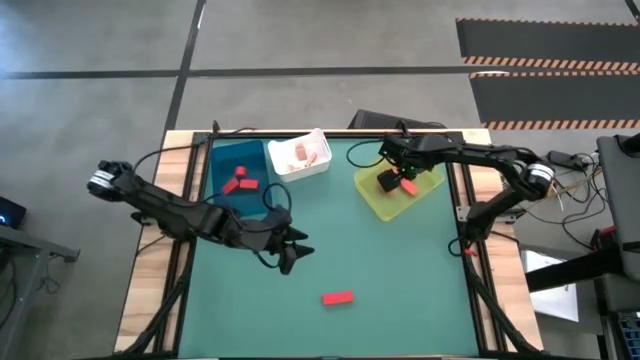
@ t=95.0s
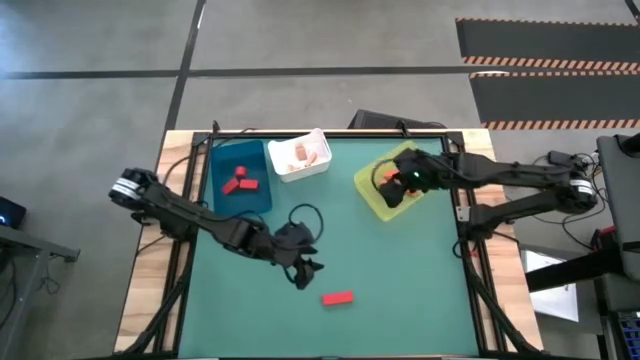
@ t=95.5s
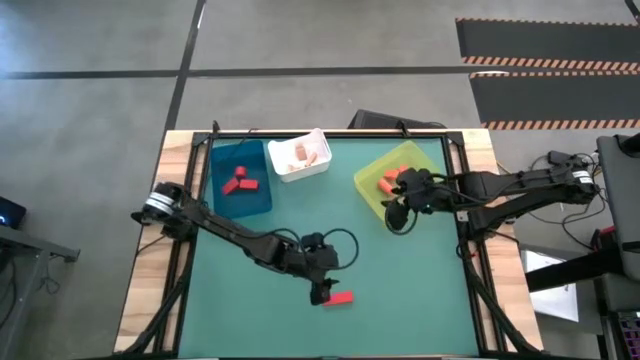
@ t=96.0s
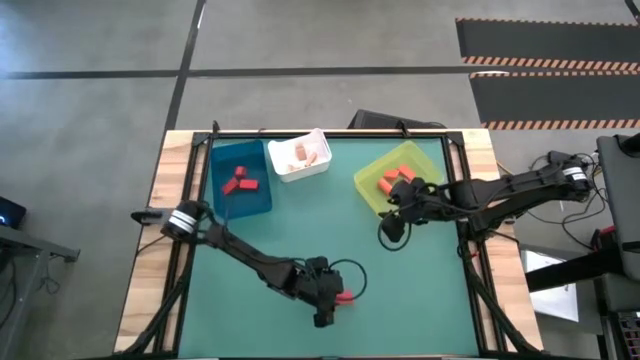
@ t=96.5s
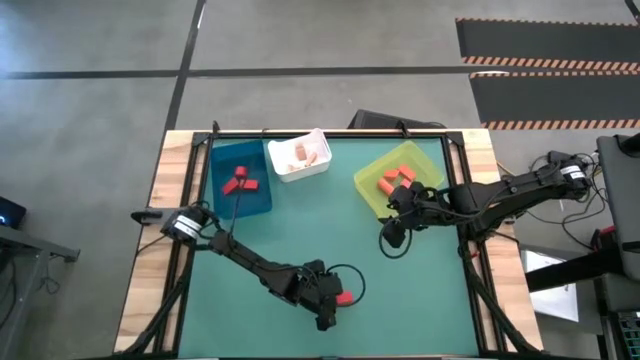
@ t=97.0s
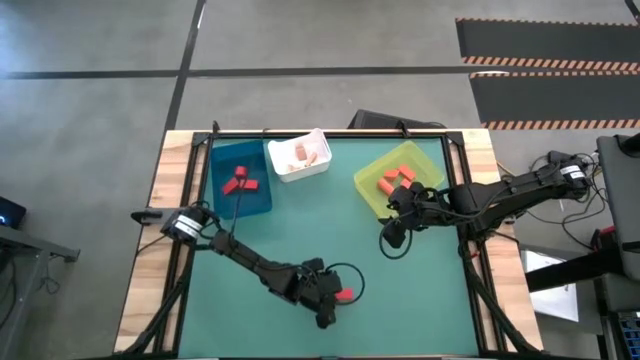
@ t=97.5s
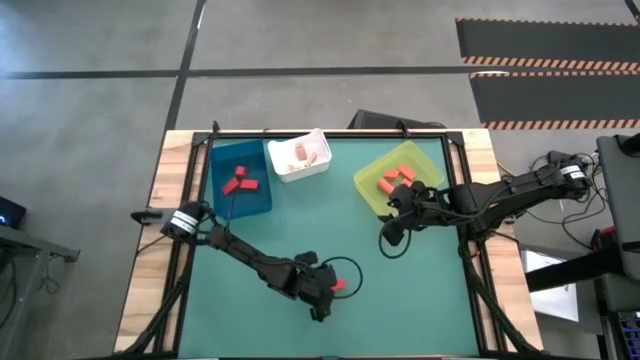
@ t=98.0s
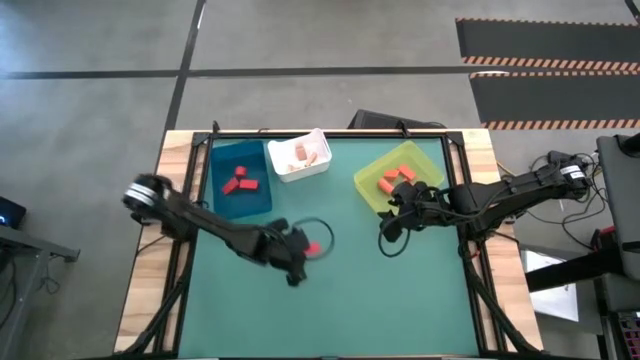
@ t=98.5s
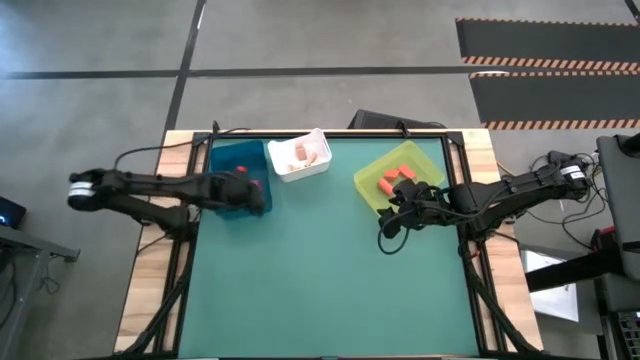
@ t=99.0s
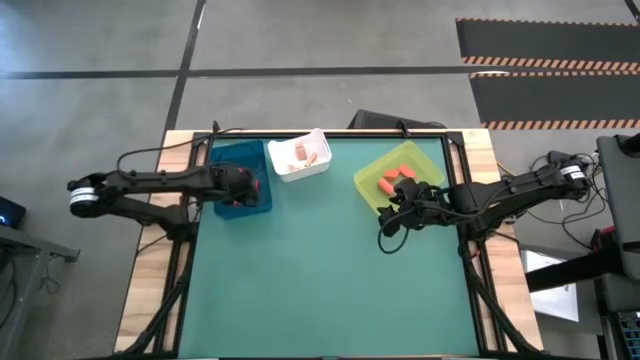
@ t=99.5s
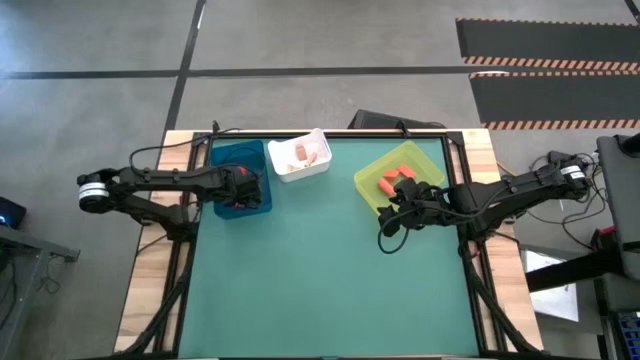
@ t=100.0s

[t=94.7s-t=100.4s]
Task: Sort & place blocks by color
Put the red block into the blue bin

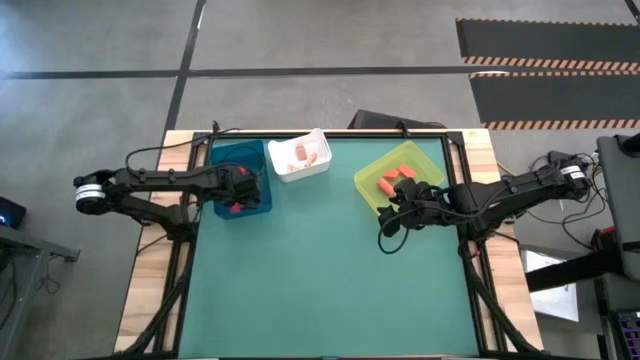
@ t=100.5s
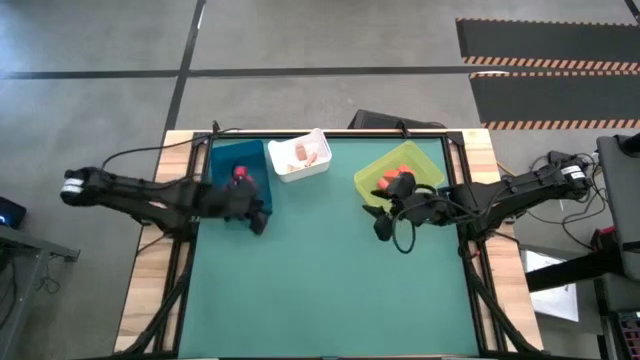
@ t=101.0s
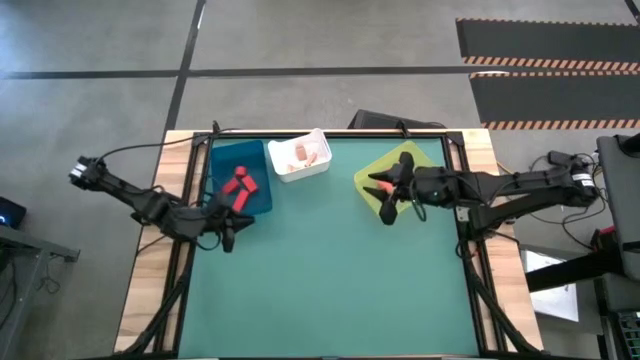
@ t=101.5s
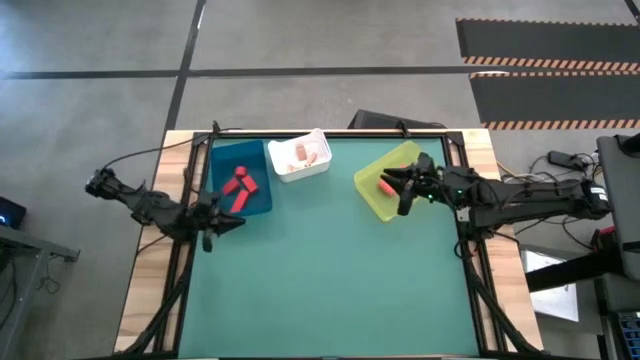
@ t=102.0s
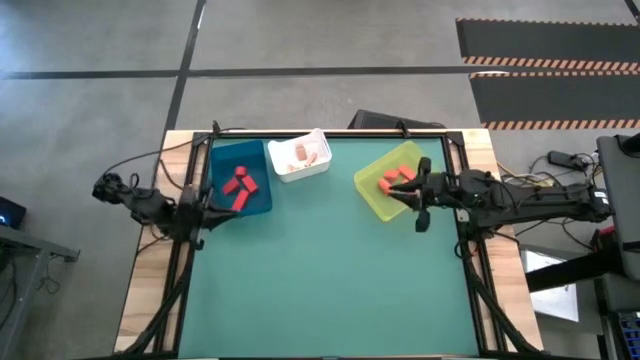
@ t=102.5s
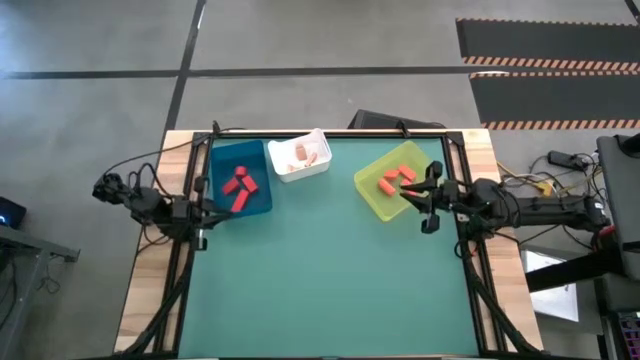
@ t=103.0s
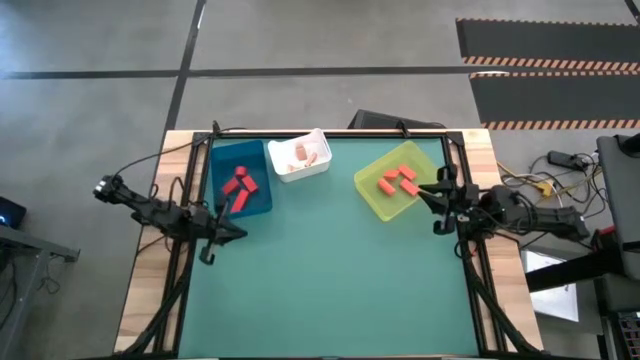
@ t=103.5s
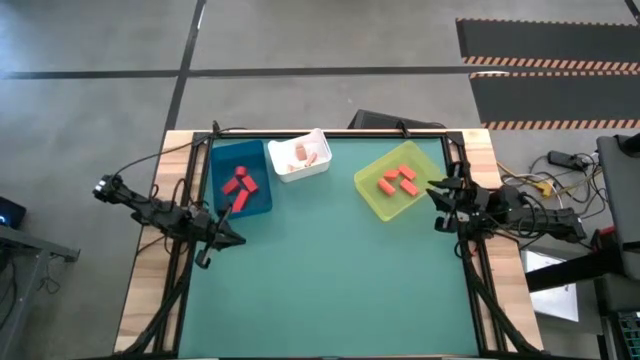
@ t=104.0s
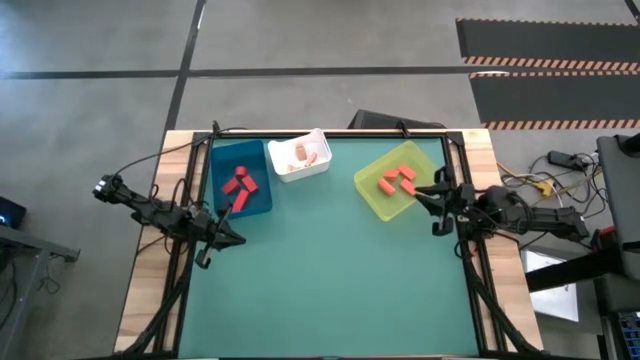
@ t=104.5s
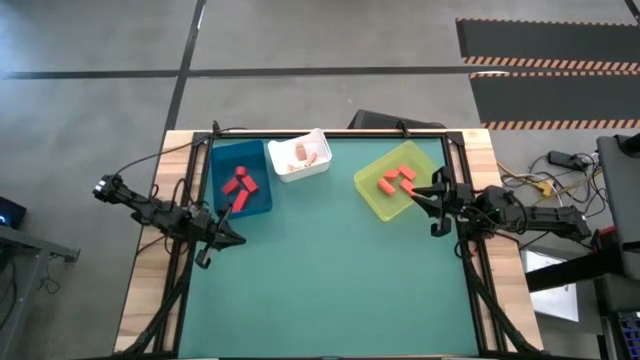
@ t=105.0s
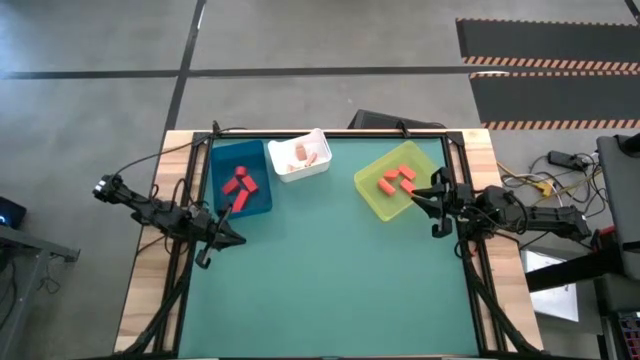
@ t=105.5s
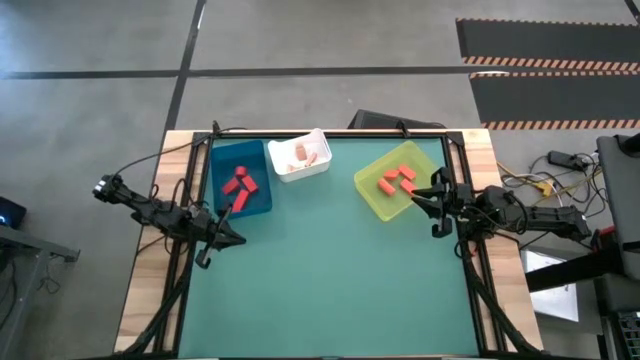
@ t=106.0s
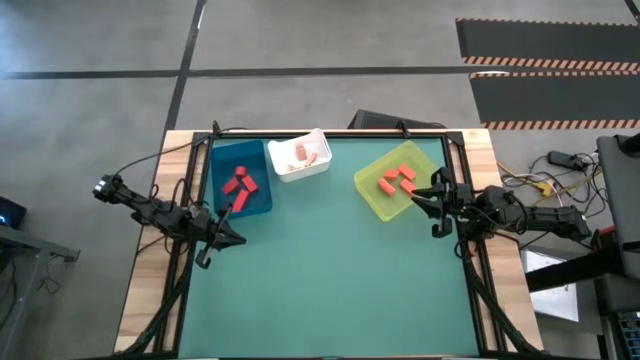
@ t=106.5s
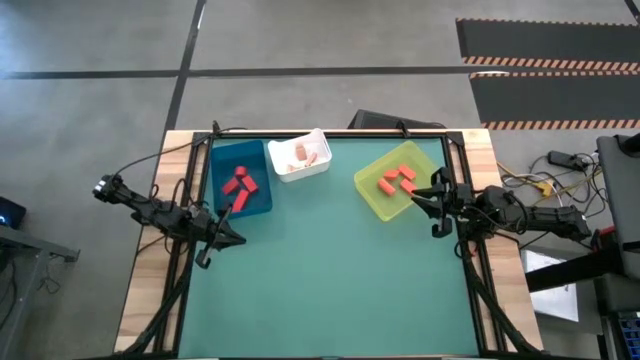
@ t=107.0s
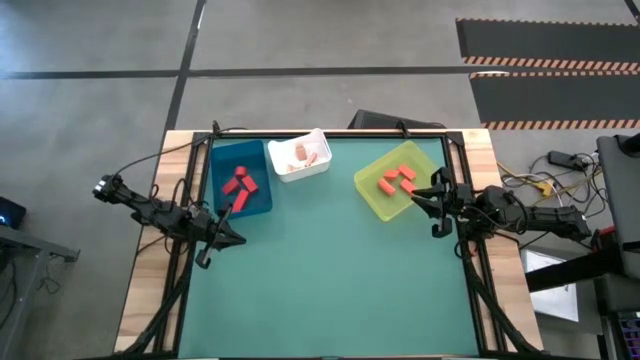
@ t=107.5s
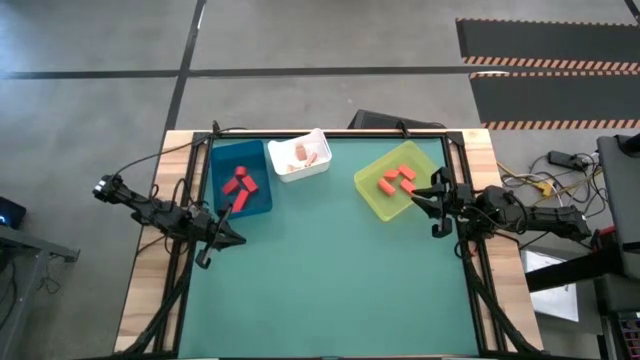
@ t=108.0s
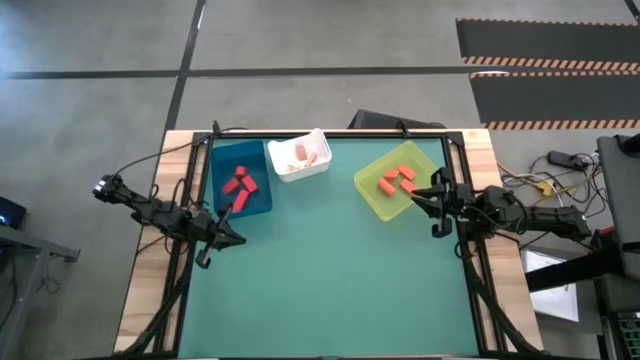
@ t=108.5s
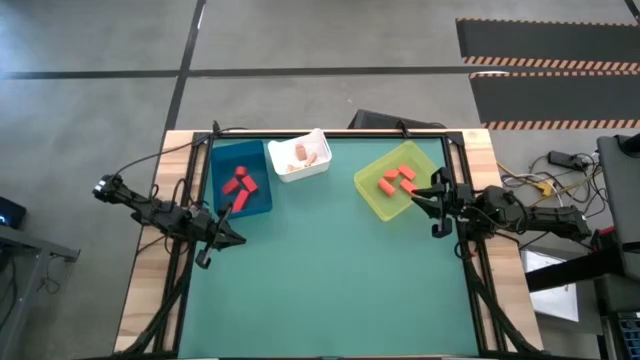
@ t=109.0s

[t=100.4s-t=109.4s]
Return to Home Position

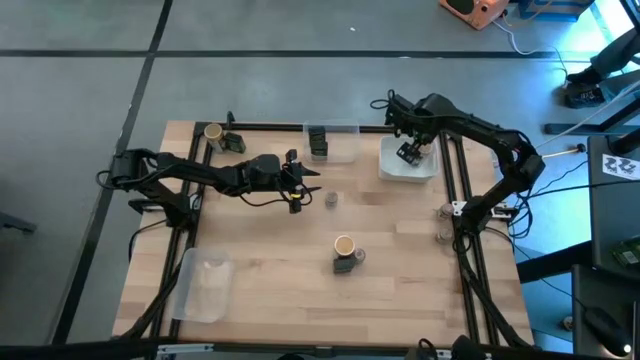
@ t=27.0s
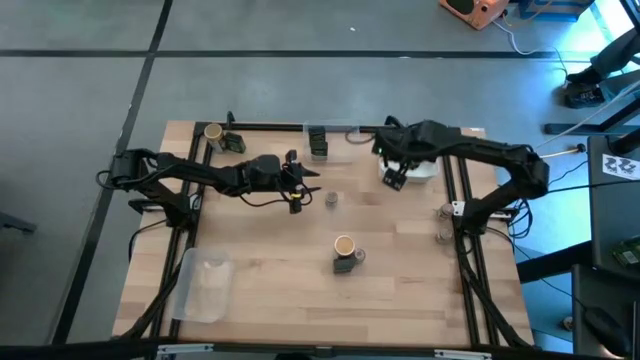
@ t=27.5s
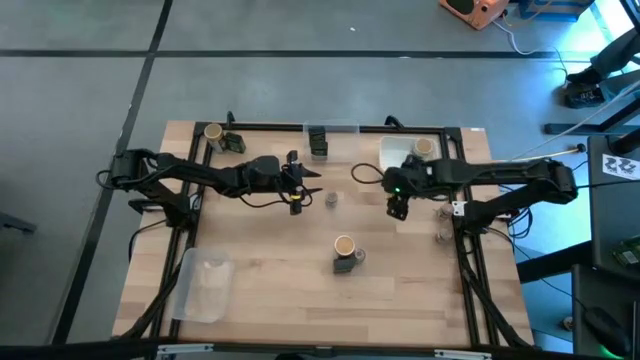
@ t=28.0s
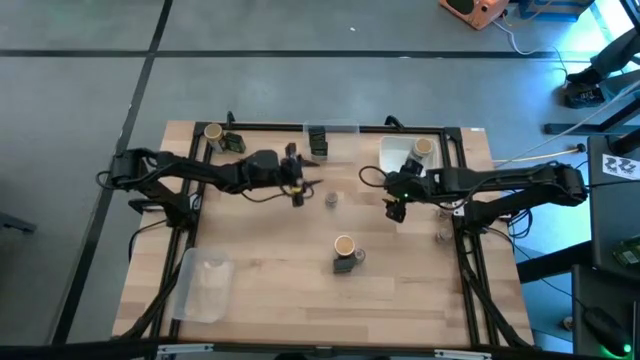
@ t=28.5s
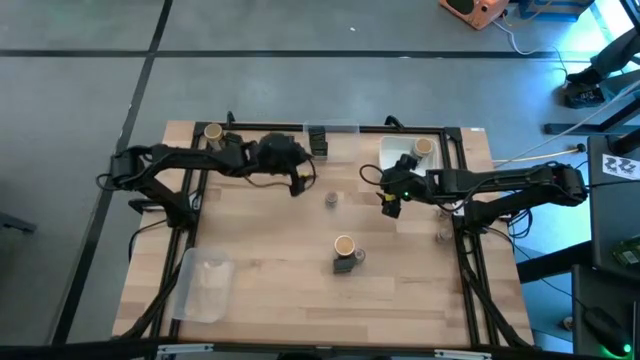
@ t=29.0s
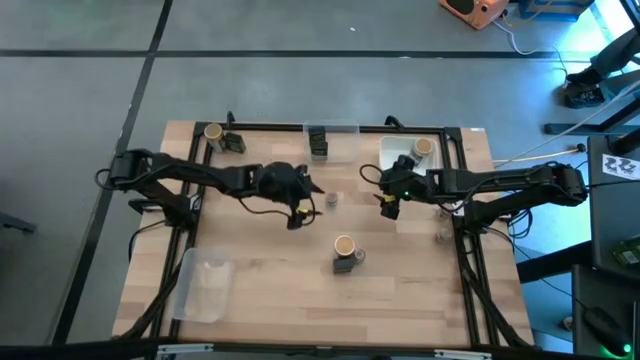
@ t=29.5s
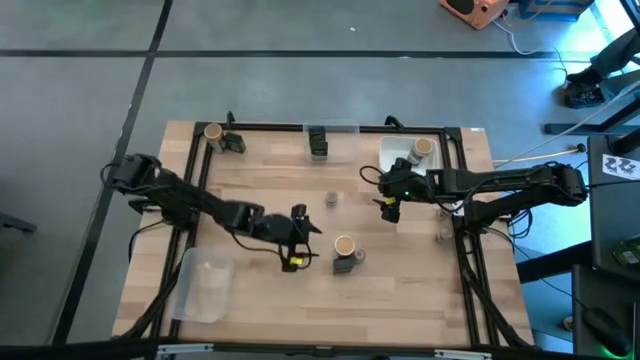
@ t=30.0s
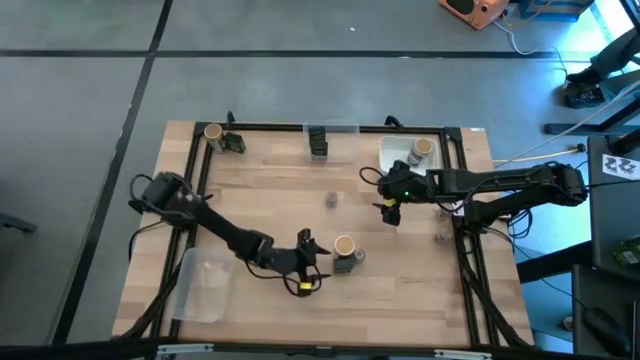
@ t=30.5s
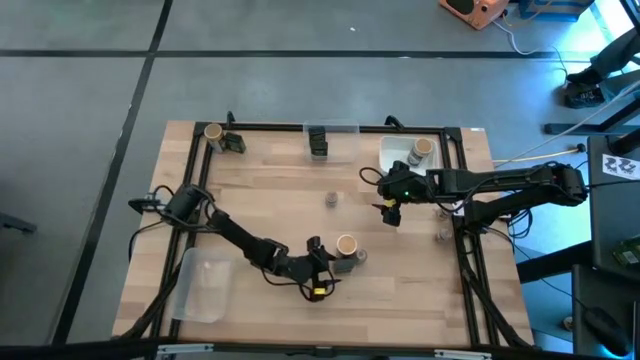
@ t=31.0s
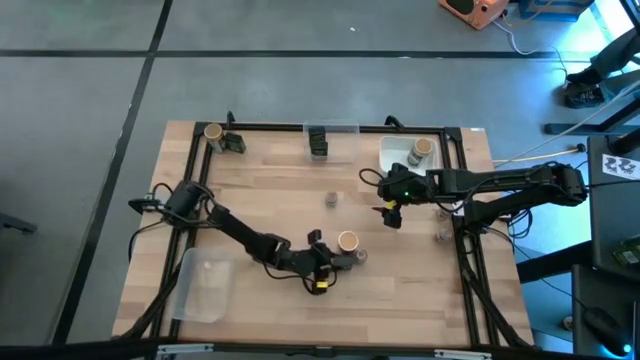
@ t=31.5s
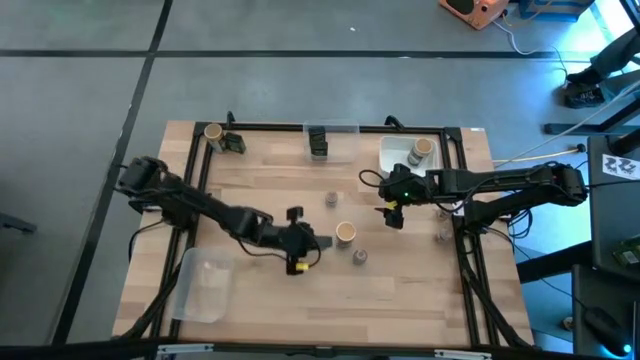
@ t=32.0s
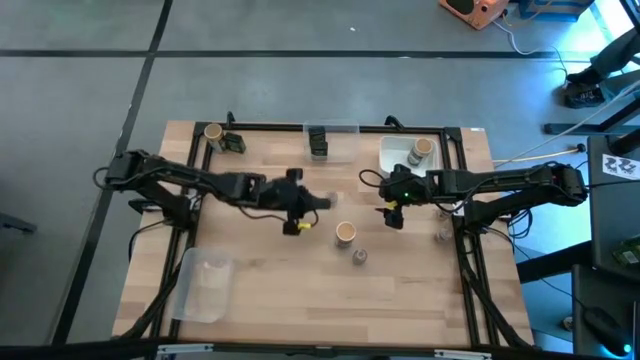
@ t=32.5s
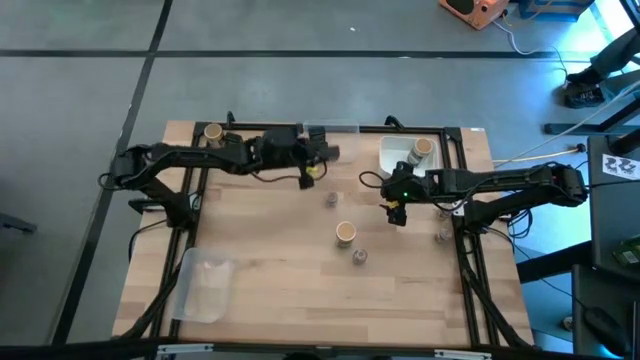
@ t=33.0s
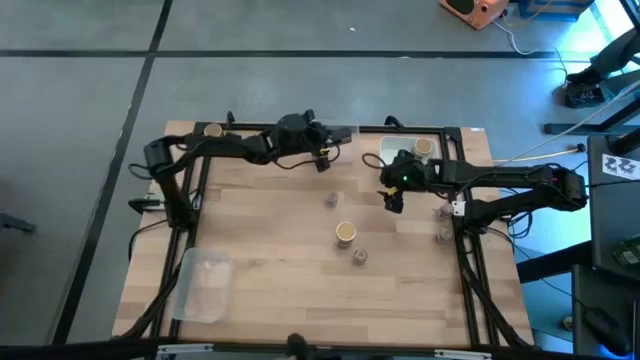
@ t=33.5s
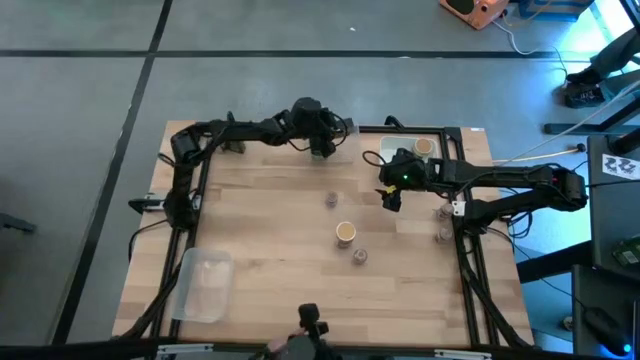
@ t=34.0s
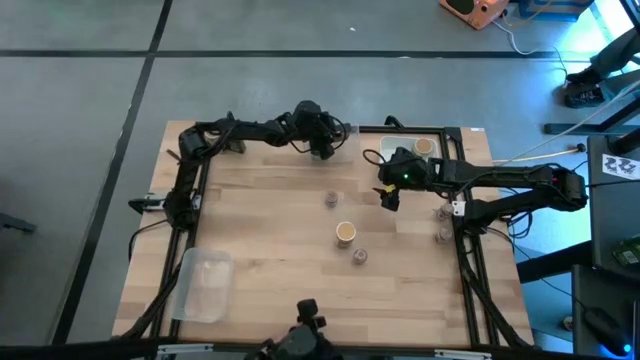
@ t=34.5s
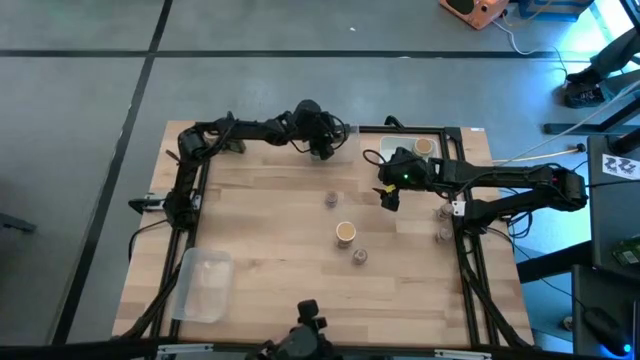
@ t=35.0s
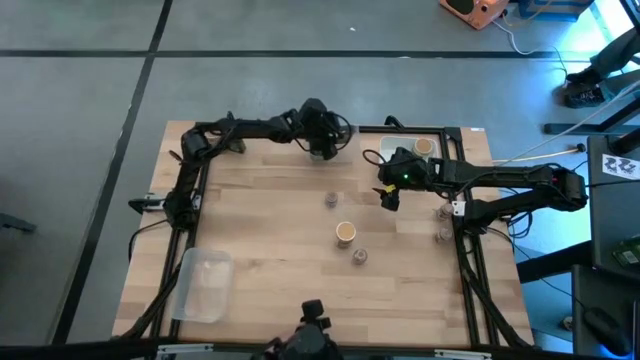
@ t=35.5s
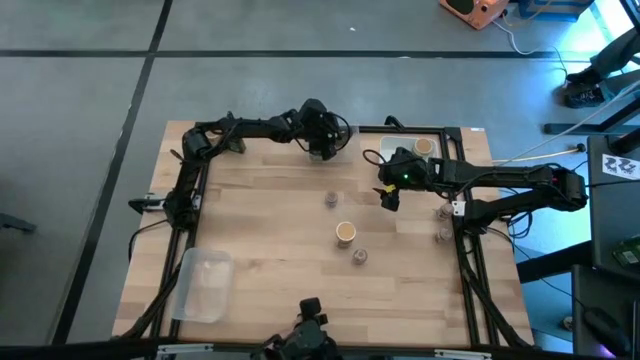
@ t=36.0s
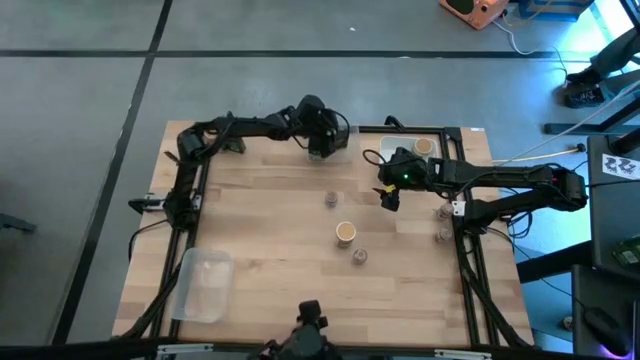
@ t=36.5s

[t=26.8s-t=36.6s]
Task: Sort spices by type
Put the bottom black seasoning can into the top transparent bin
